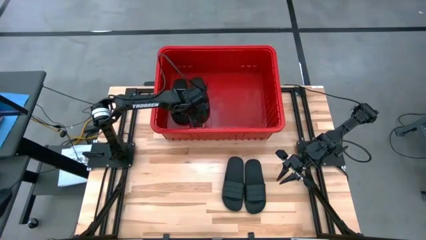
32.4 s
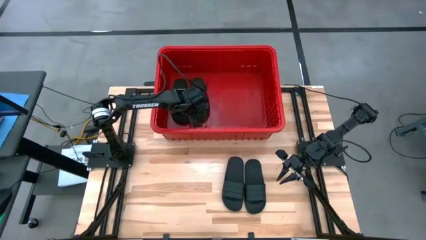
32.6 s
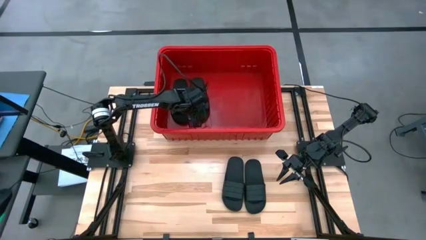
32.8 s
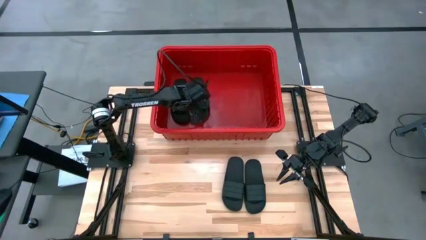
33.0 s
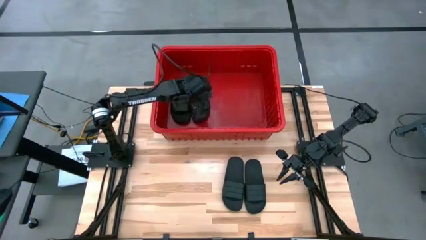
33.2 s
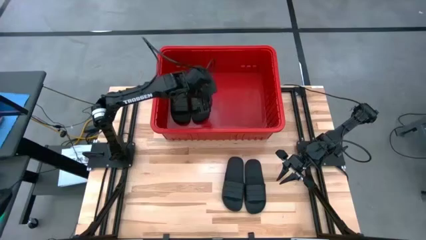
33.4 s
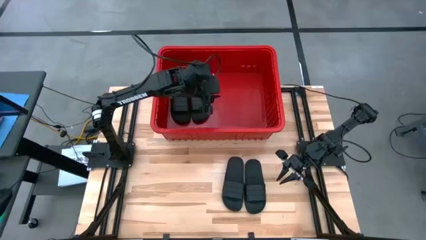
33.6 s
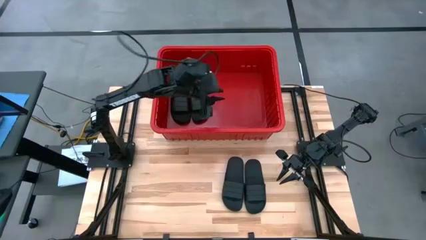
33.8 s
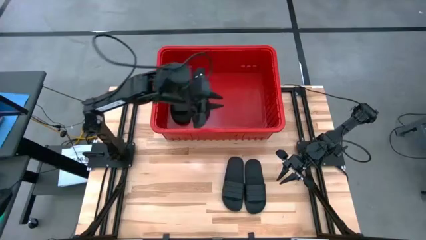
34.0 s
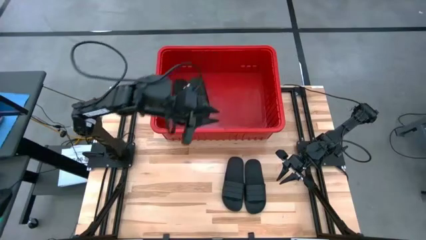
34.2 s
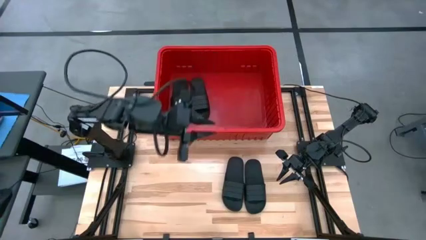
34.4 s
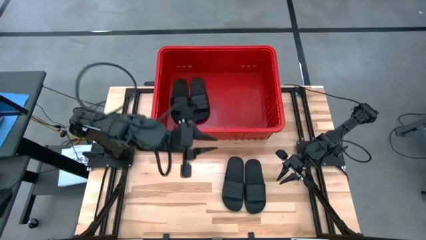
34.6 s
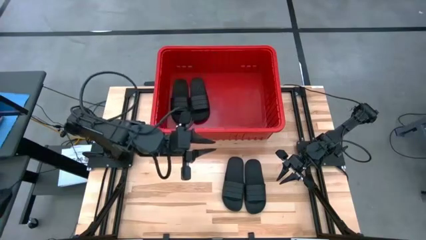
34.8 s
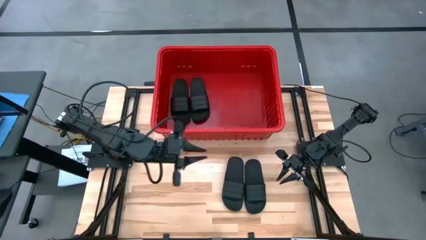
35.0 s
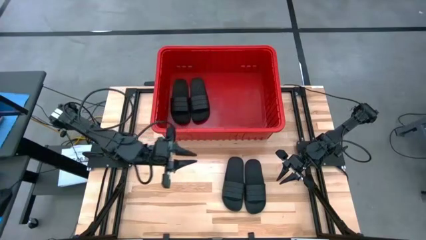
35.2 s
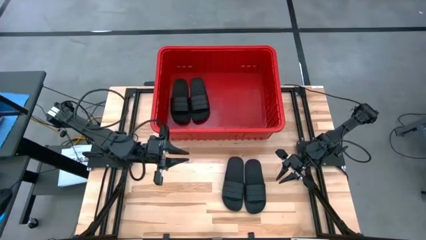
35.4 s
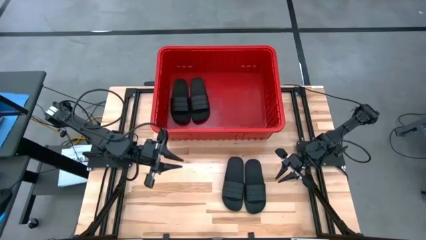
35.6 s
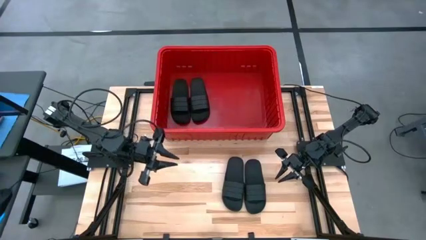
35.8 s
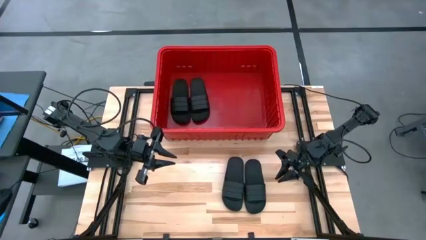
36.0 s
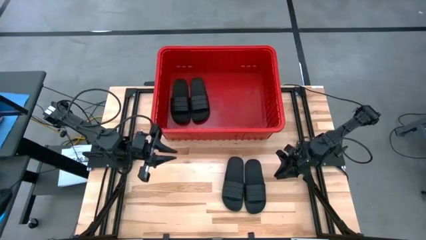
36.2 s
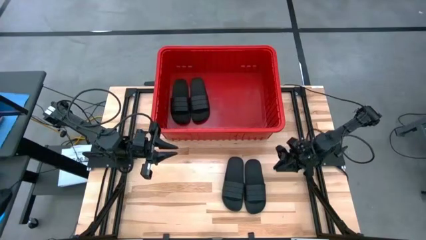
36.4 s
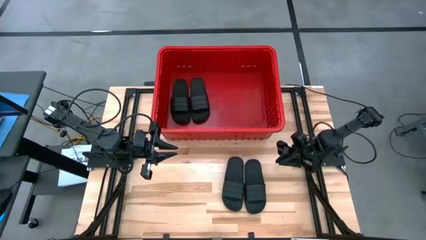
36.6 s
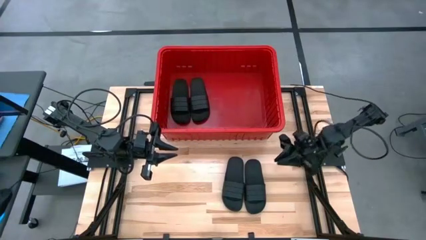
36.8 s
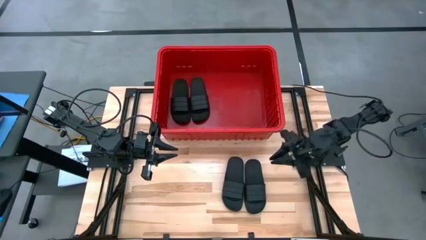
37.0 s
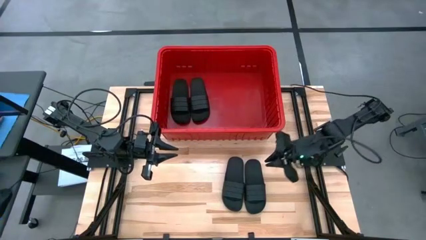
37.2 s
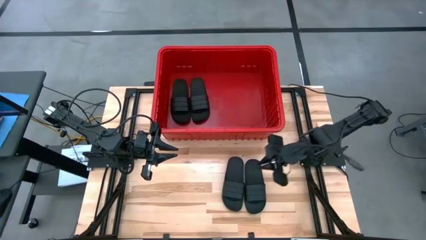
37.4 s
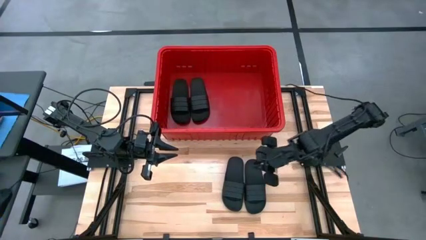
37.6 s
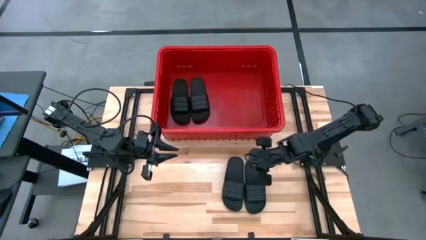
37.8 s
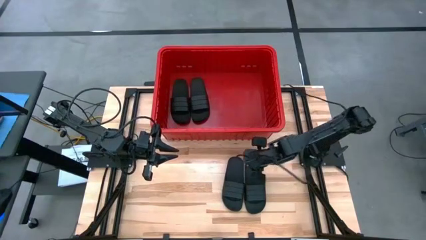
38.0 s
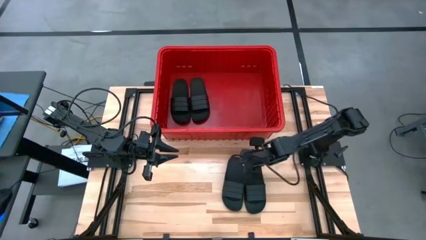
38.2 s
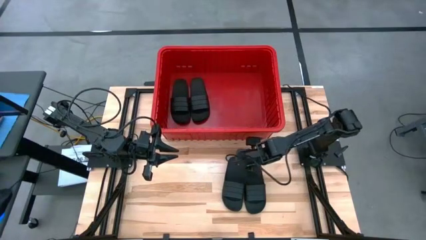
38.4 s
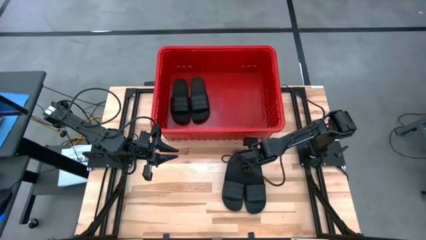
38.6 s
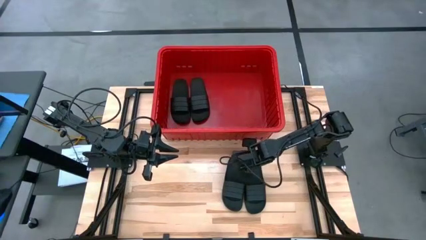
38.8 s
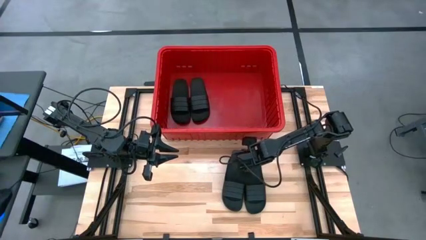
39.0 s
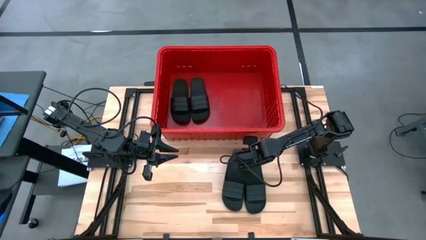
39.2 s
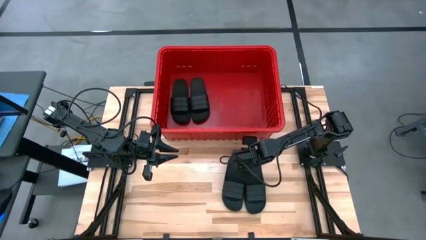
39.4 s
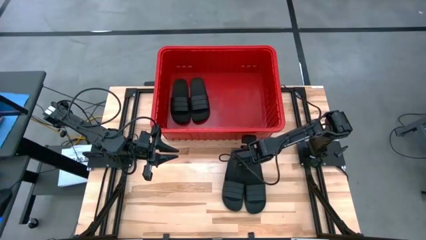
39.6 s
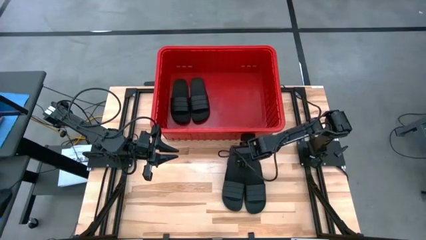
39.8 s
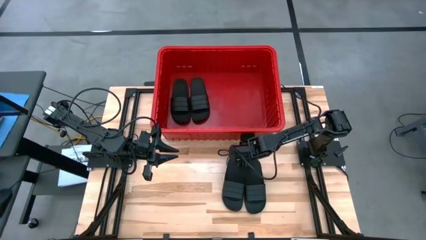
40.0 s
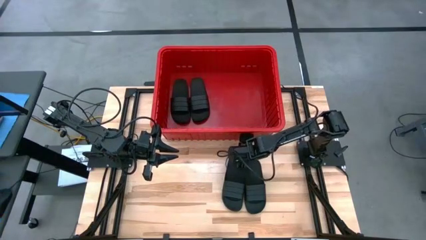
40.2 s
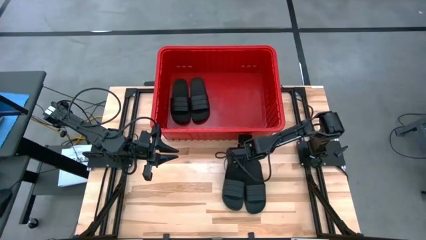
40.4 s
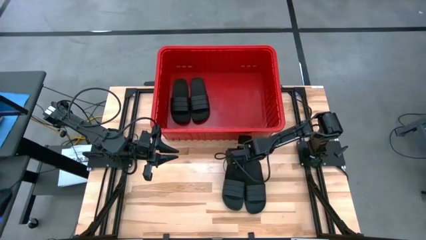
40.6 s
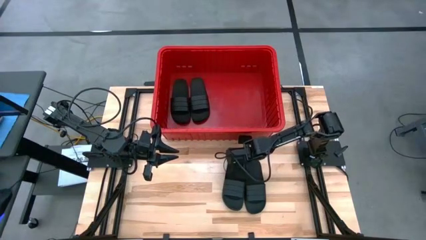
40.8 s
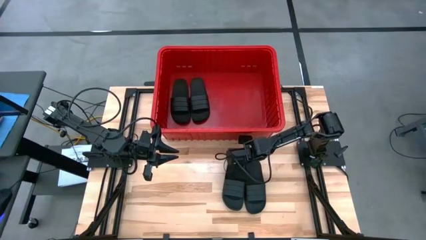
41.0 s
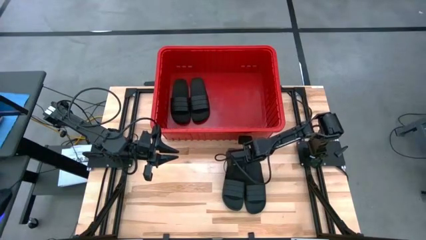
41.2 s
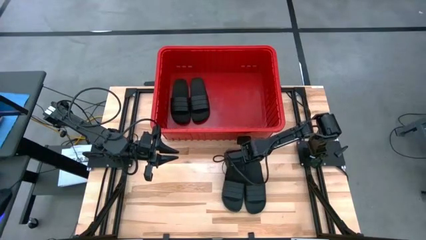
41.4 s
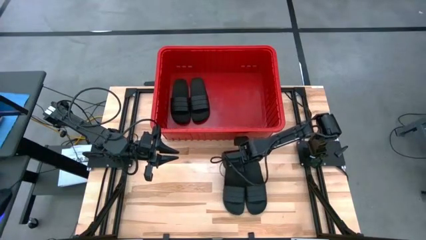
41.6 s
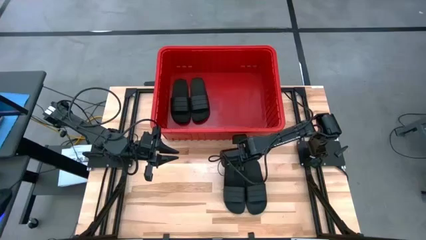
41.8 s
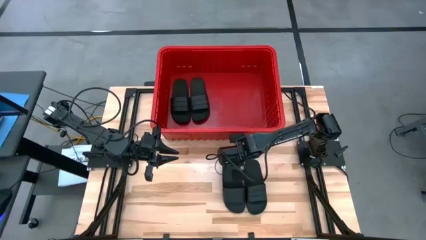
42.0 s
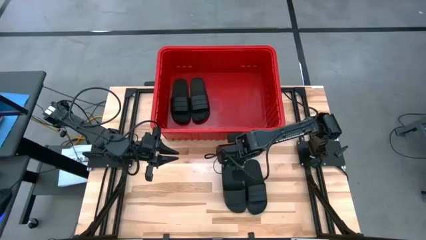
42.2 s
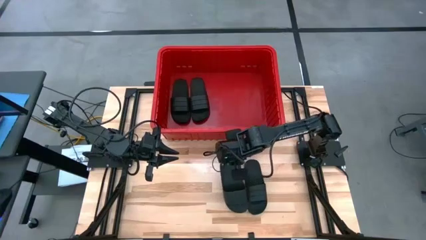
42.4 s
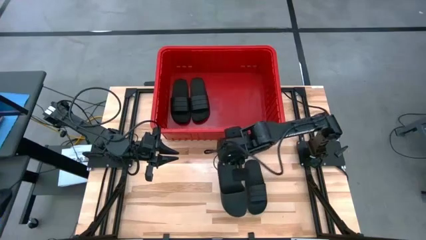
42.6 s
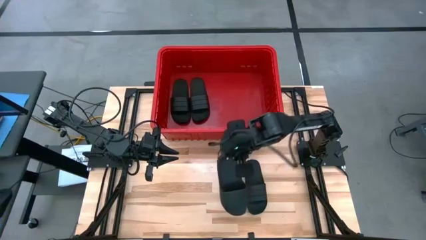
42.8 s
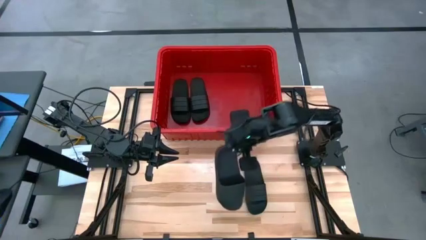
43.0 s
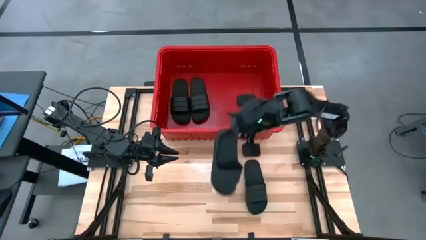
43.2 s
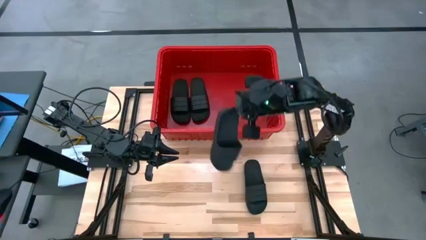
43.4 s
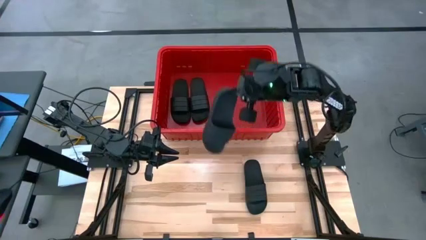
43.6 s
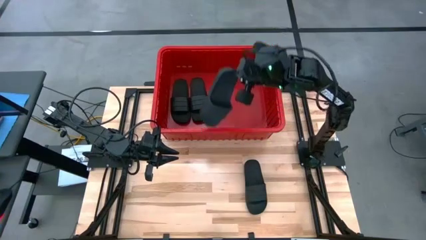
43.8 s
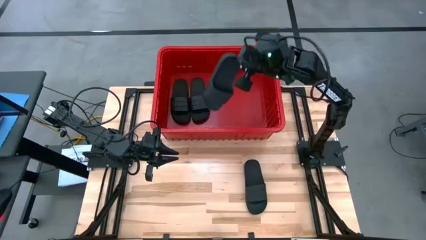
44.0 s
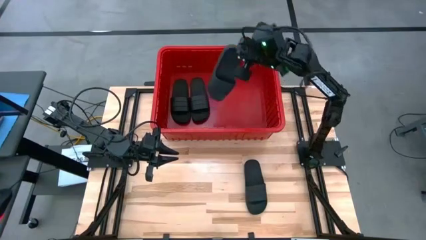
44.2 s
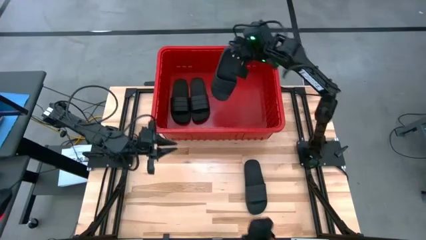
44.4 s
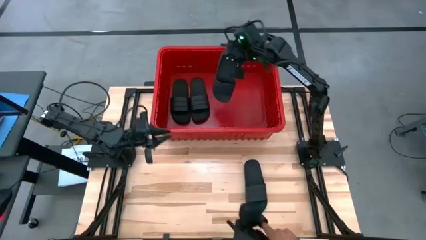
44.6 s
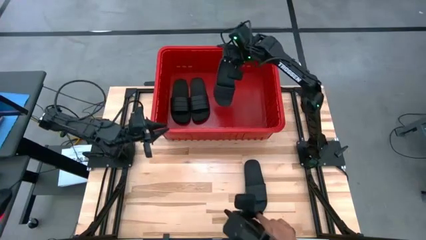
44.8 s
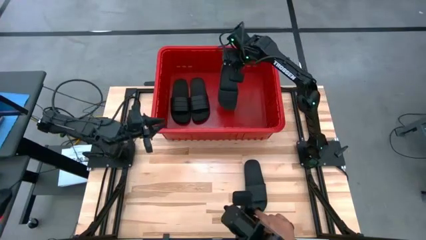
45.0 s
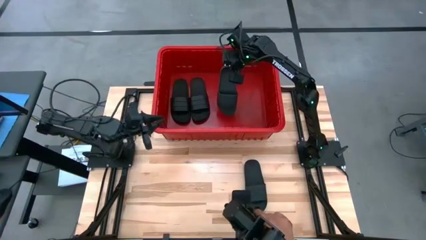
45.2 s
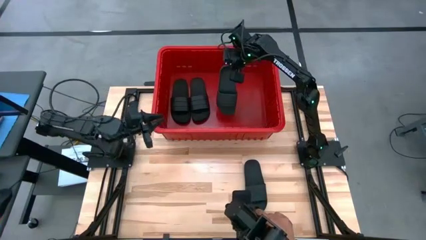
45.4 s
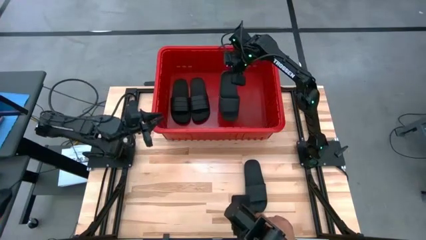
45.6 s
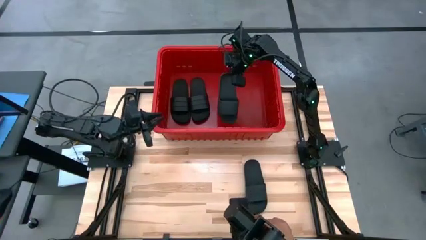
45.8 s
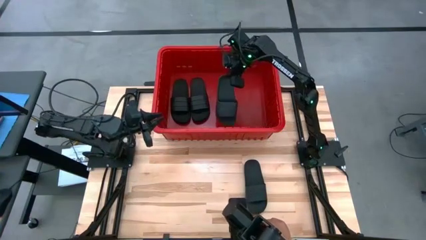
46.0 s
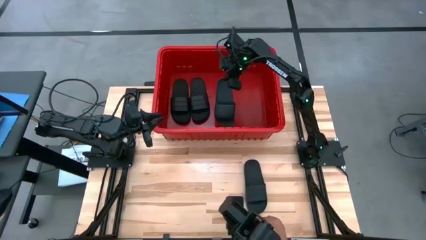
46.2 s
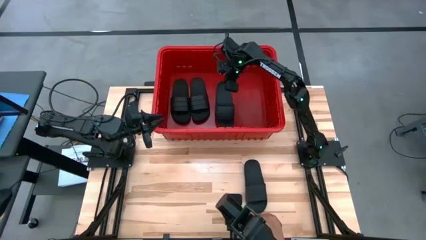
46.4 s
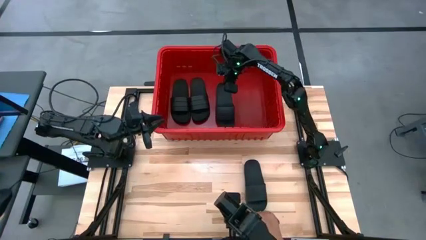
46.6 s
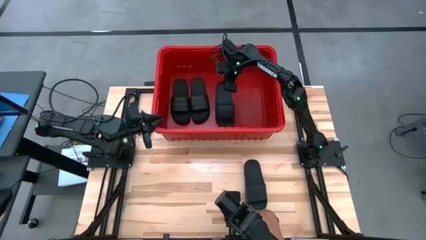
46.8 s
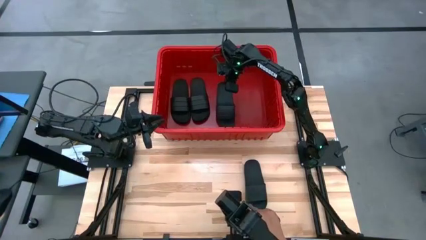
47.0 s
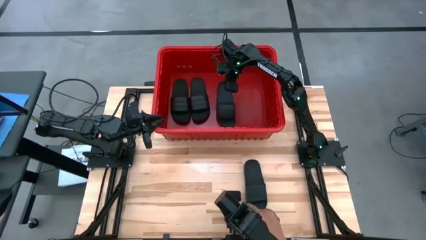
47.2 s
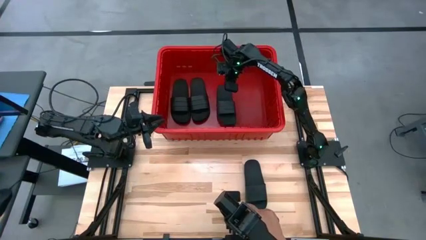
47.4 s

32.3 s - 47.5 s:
Task: Pick and place slides into bin
Put the left black slide into the red bin
